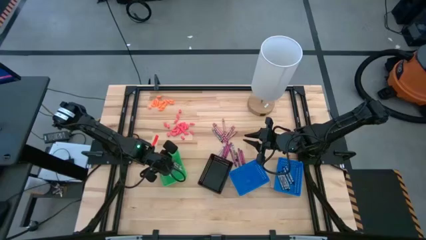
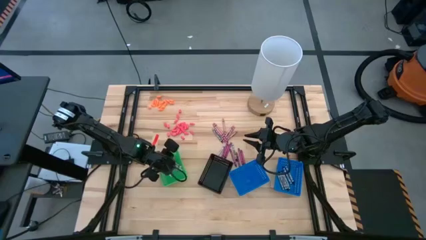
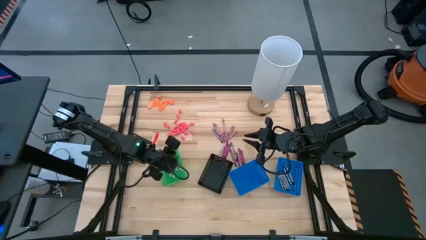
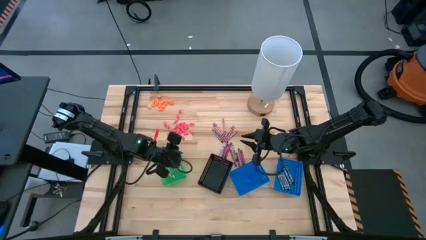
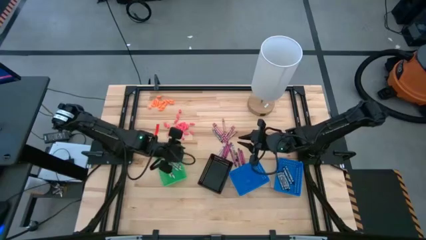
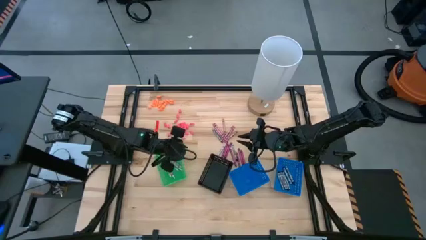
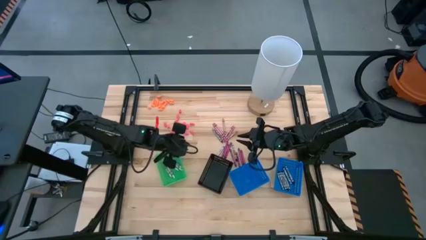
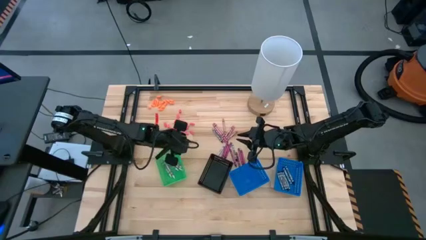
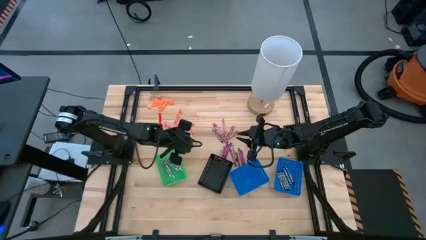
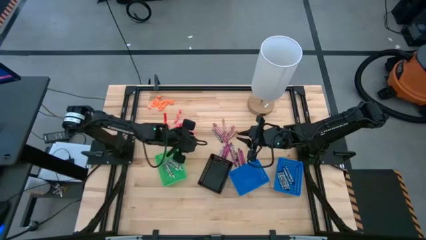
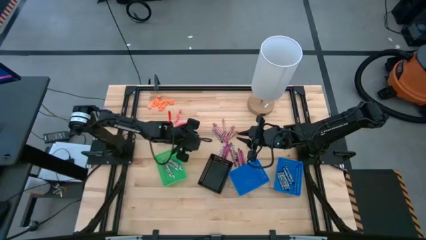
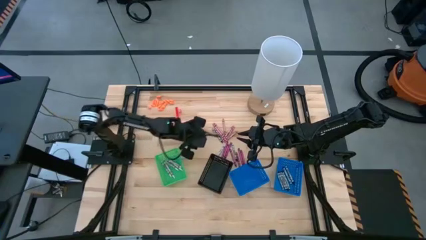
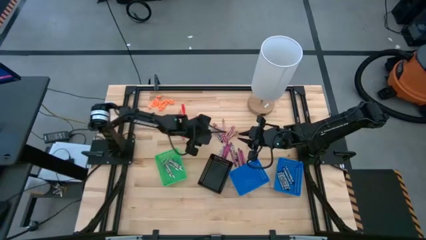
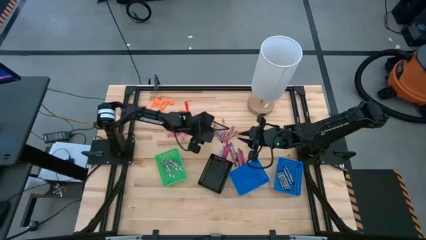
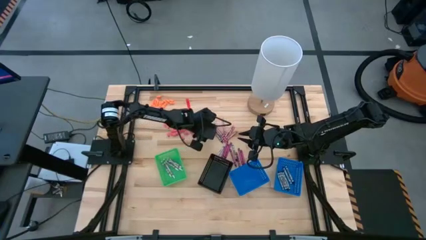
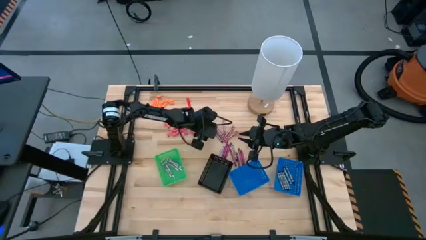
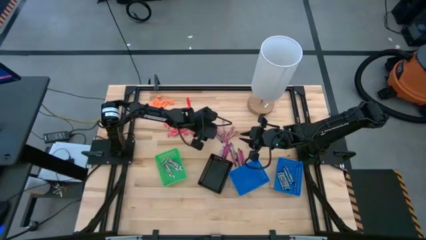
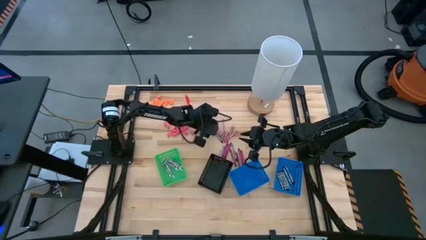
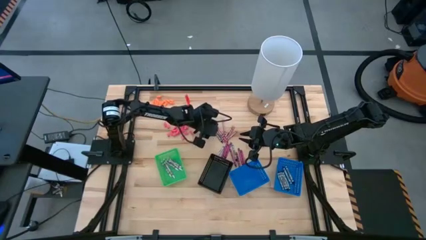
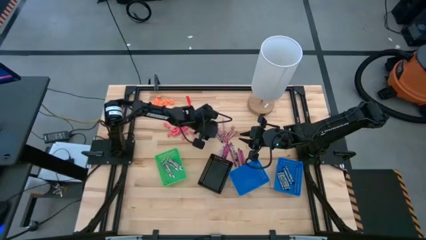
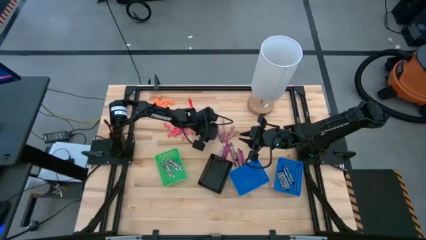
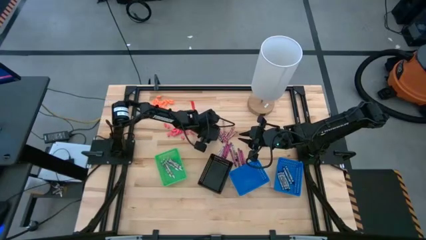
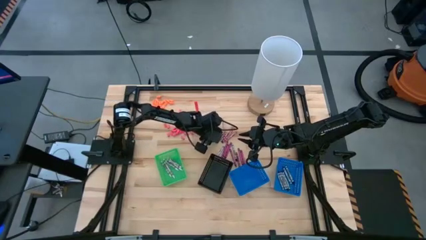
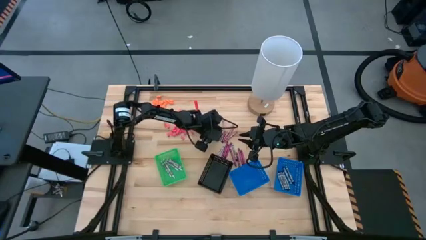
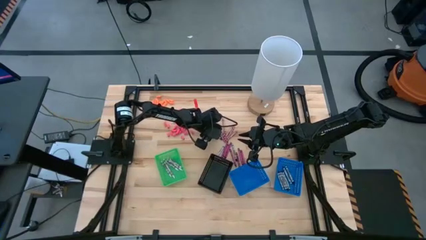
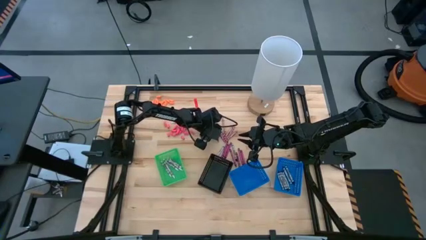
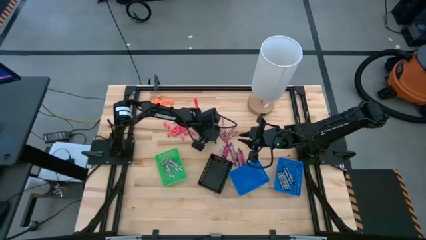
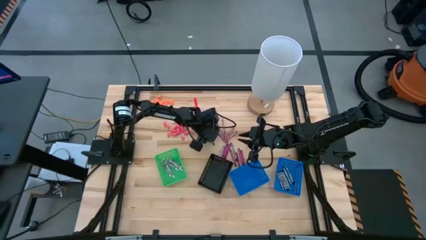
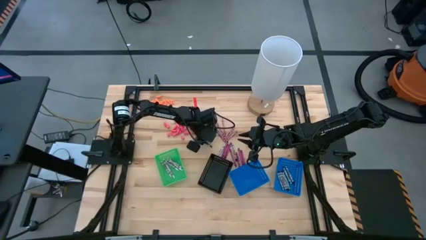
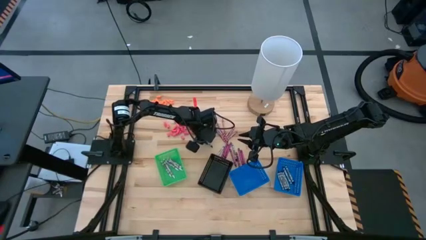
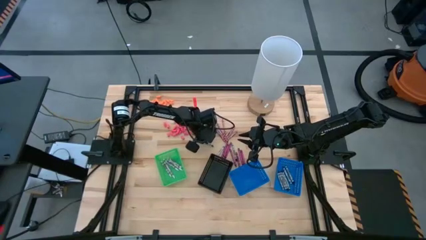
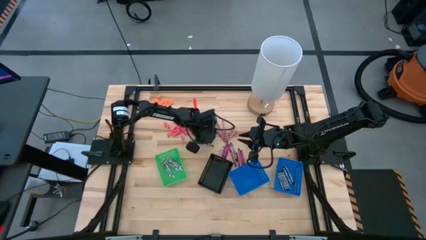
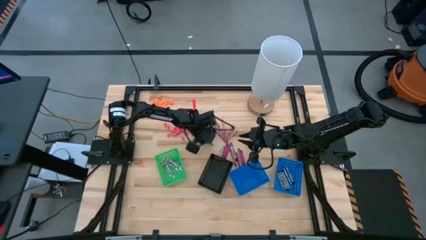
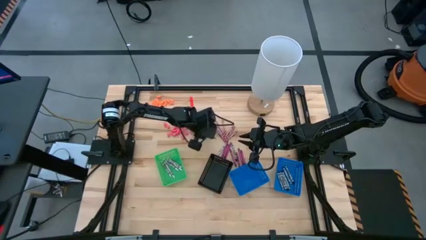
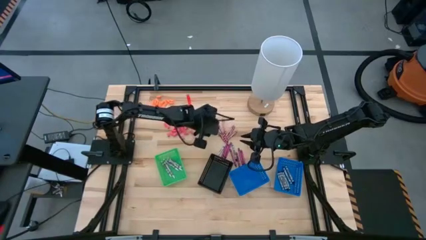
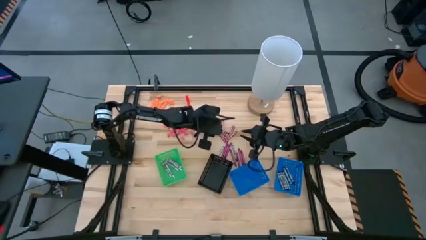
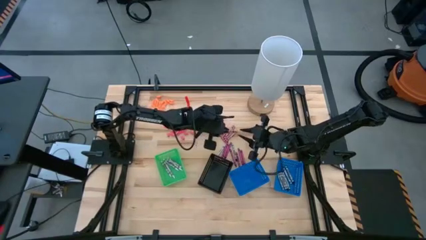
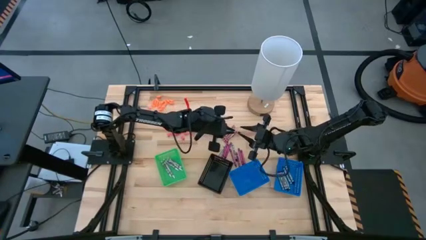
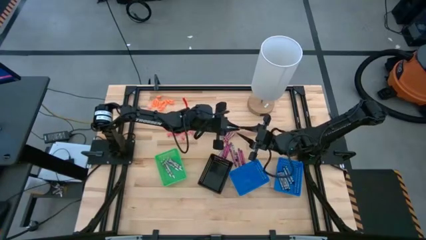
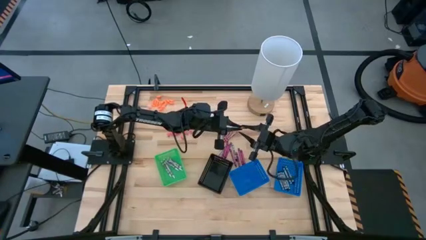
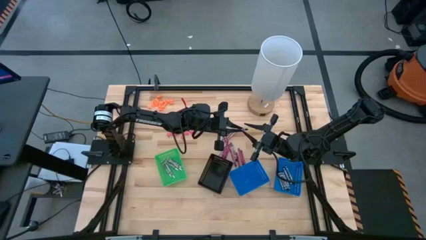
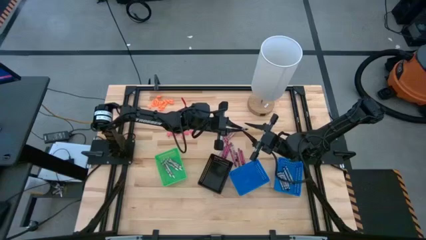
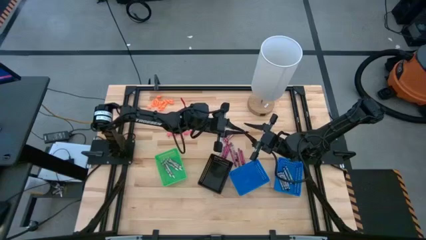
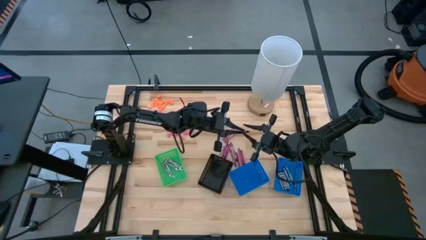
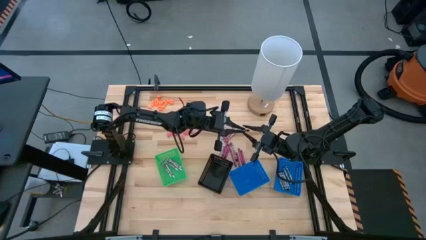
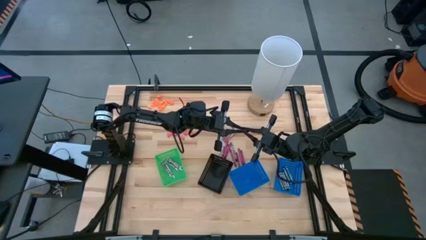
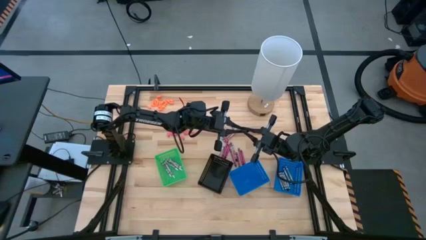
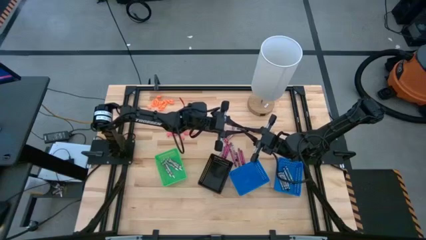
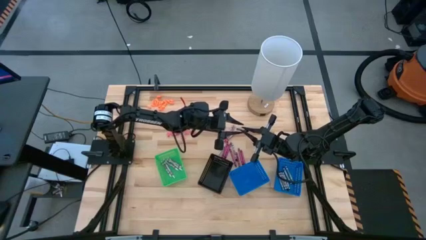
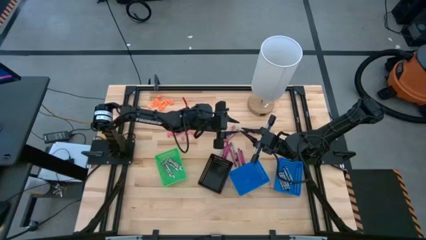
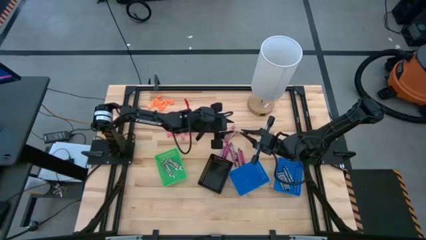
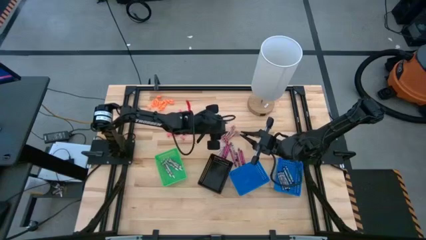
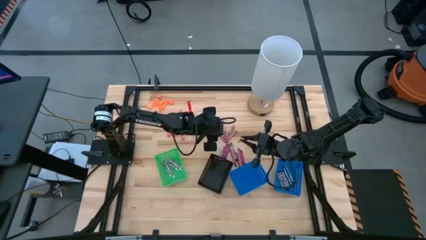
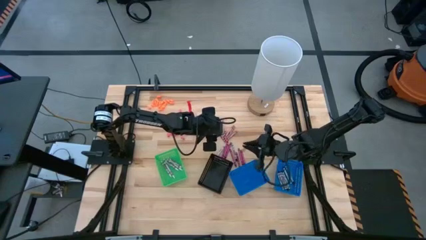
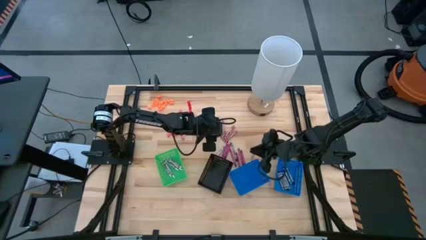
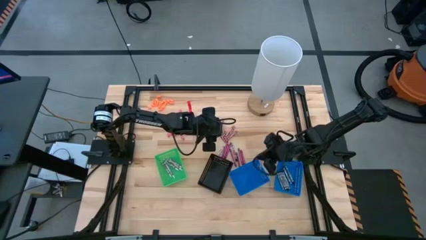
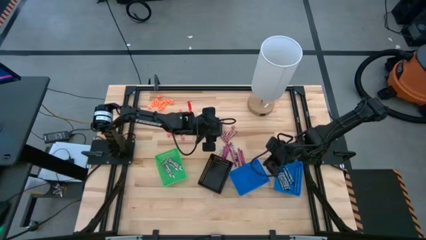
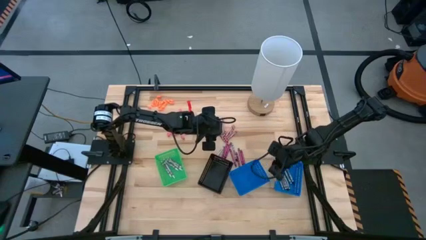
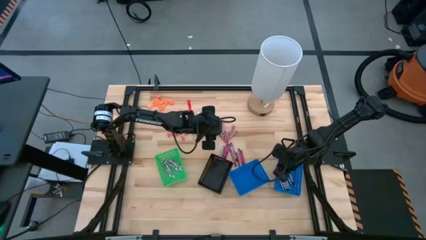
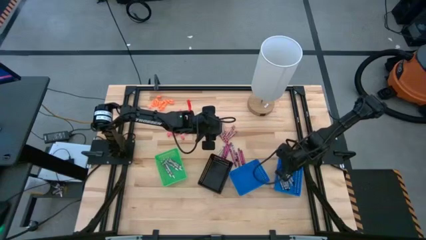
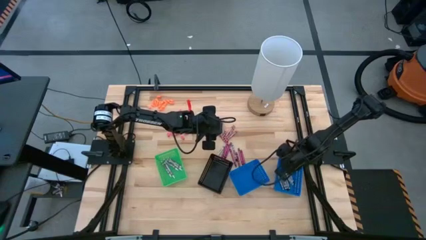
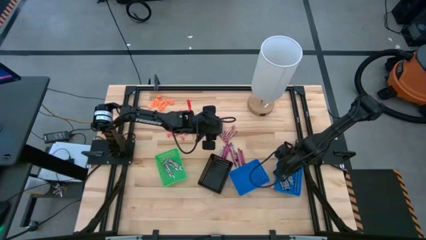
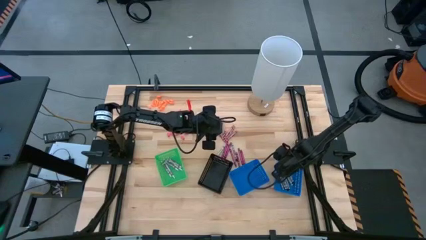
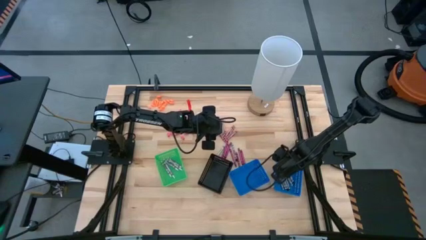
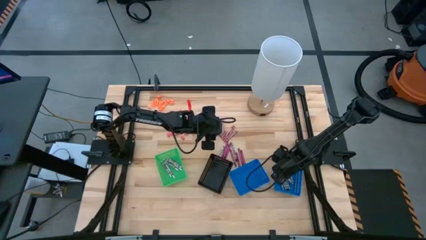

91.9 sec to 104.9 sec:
Task: Sort crayons
Put the black crayon into the right blue bin

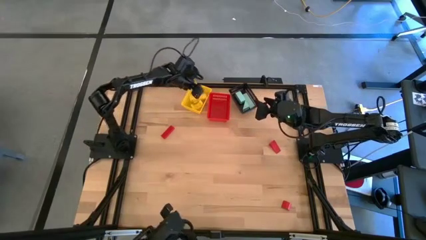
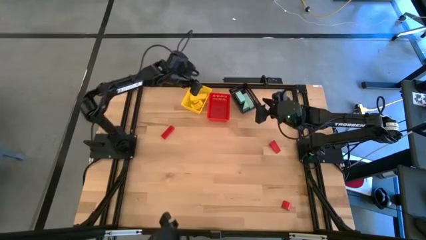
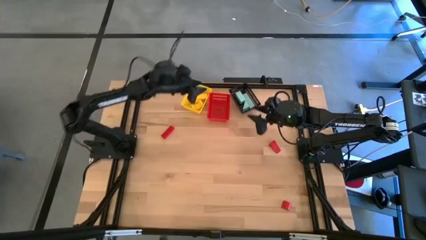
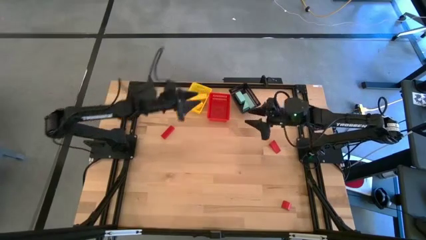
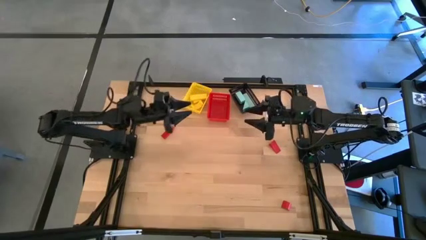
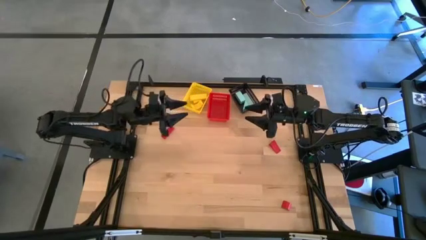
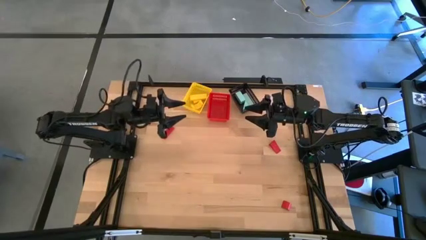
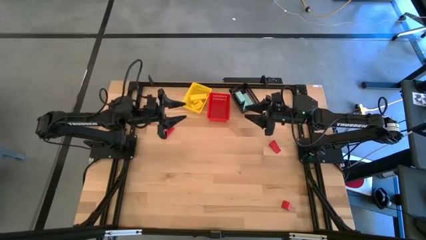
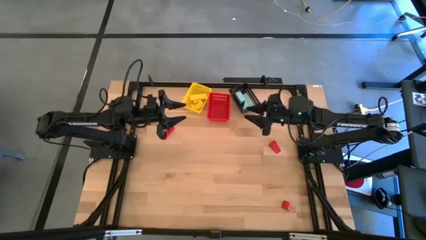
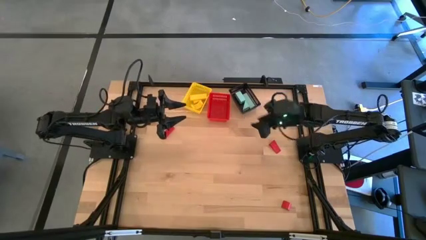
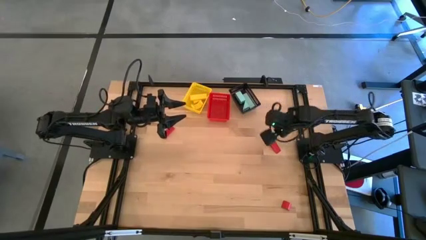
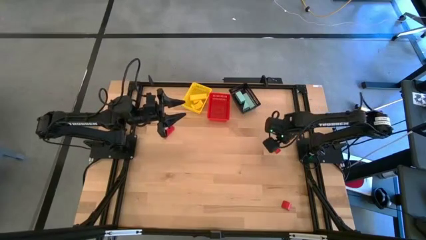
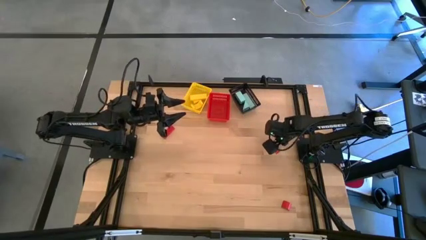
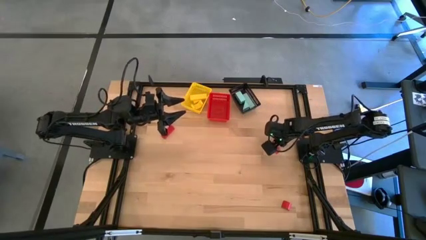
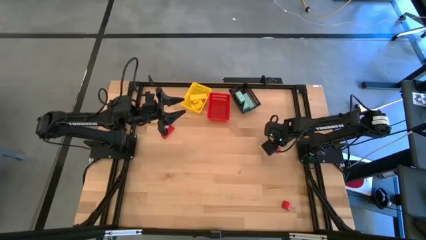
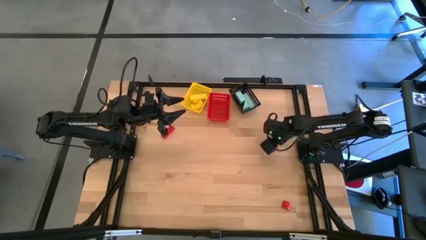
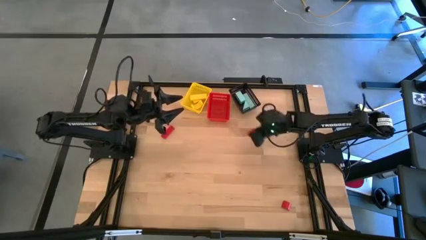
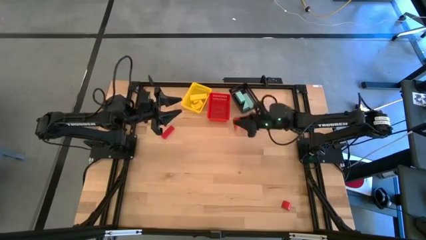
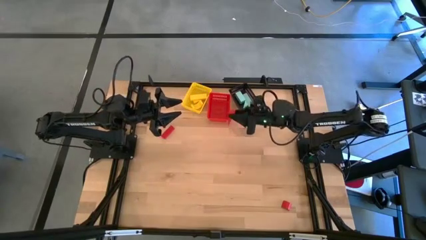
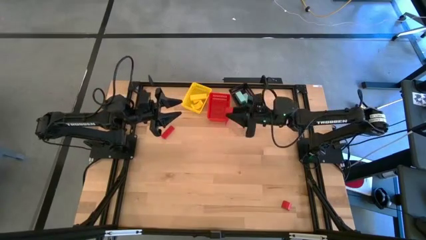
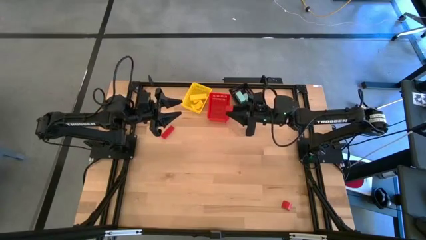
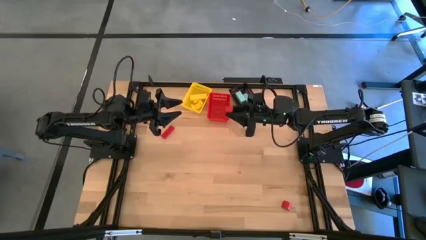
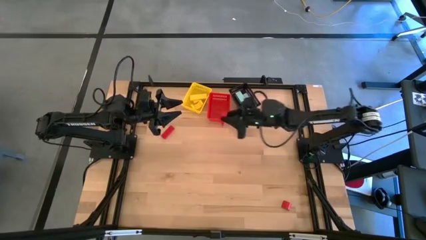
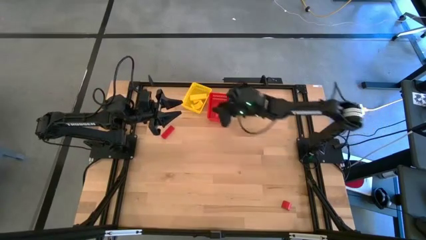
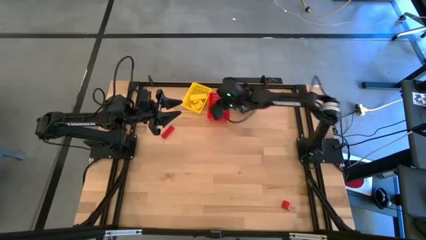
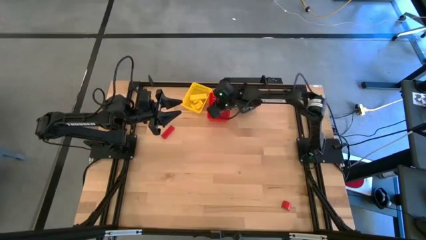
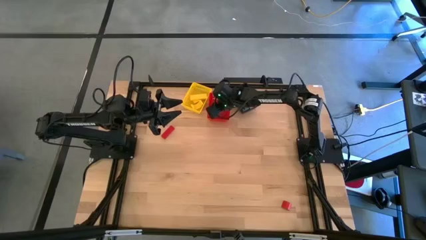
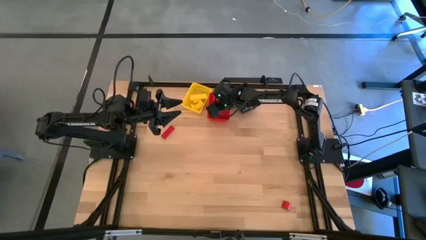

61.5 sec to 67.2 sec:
Task: Sort & place blocks by color
Put the top right red block into the red bin
